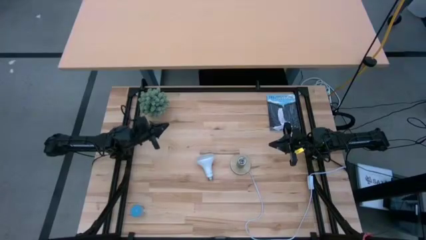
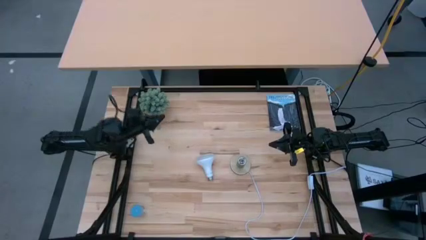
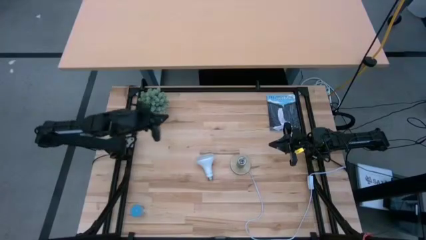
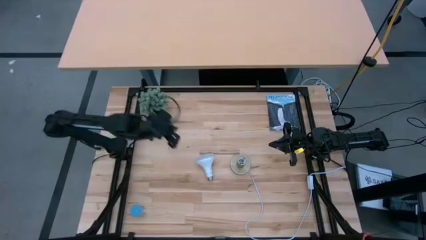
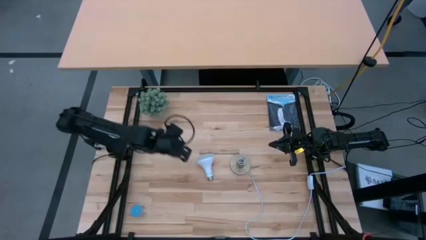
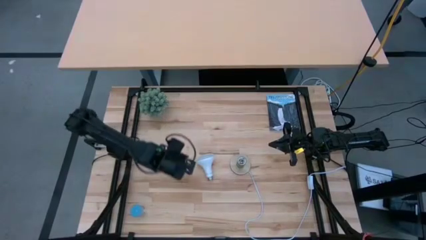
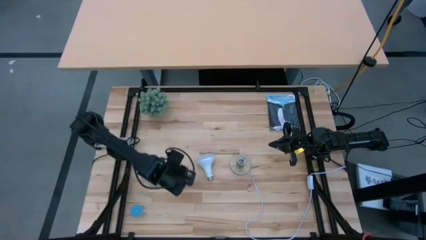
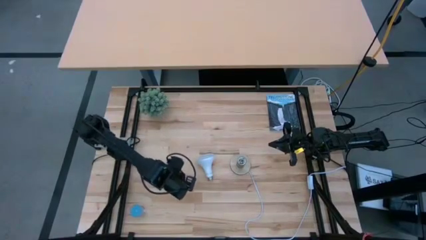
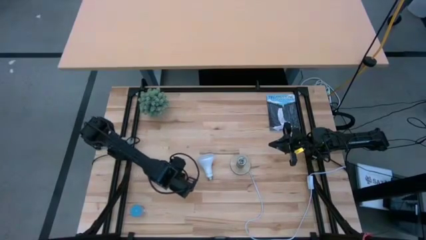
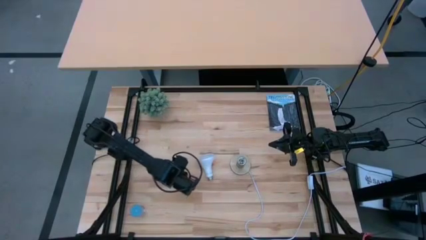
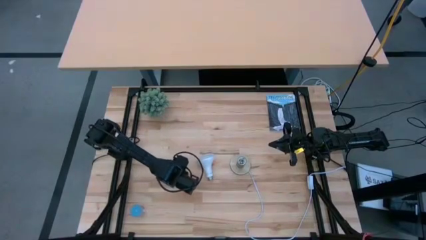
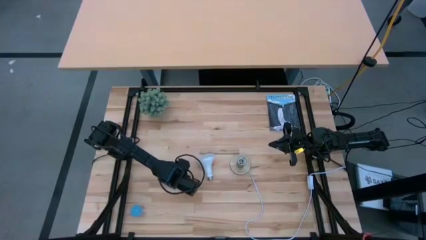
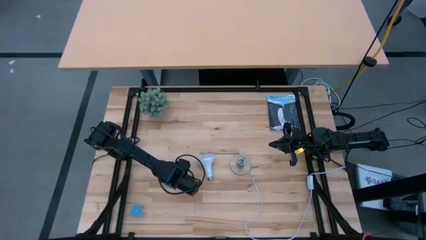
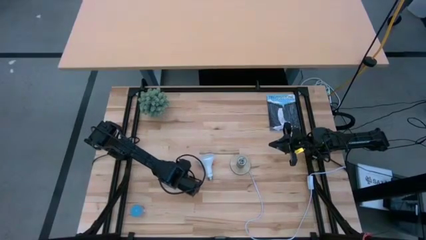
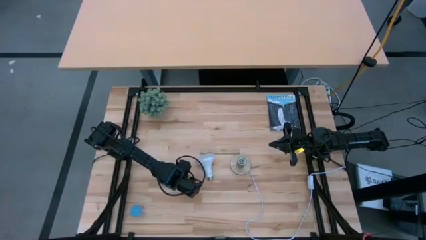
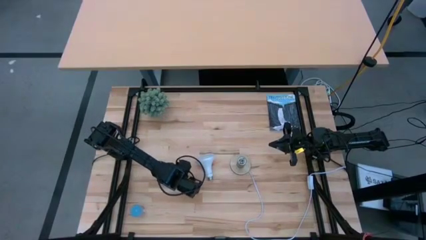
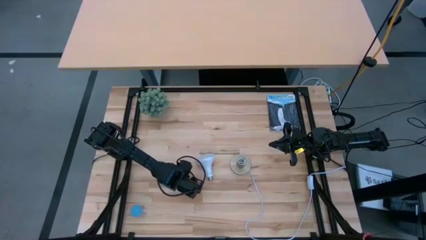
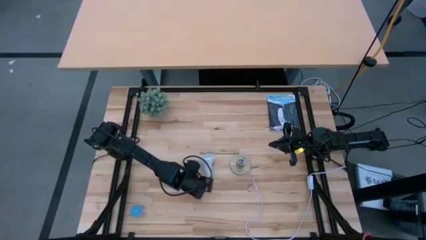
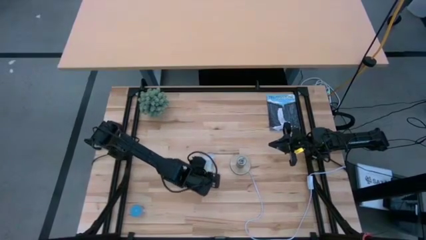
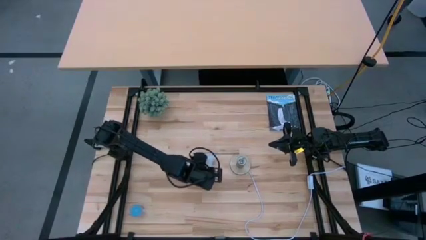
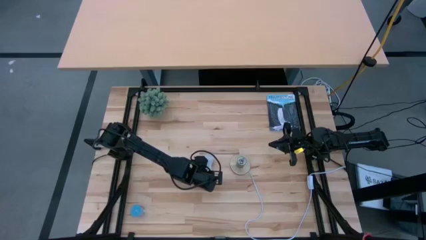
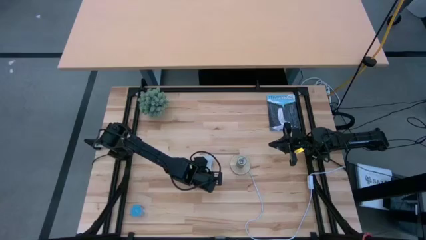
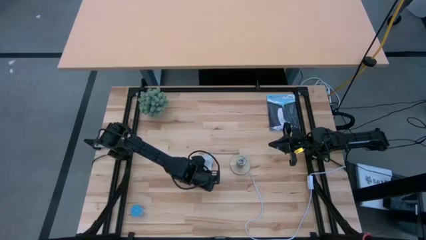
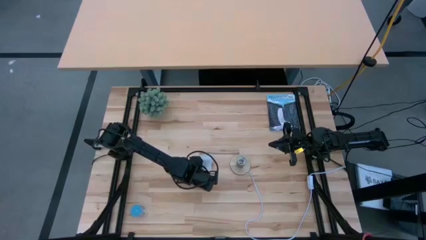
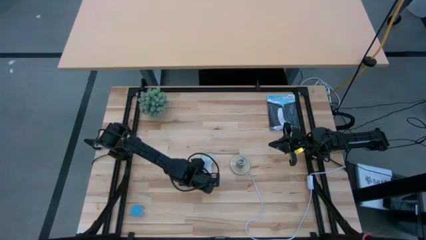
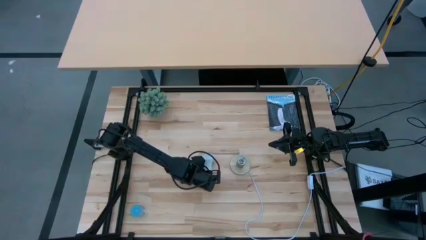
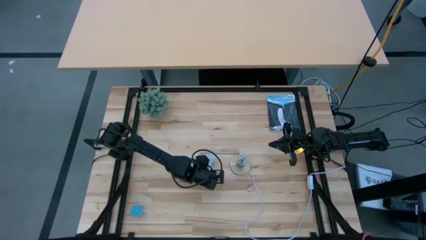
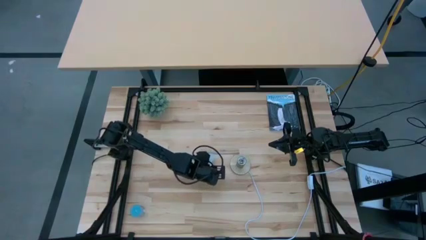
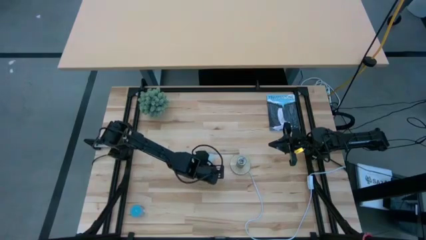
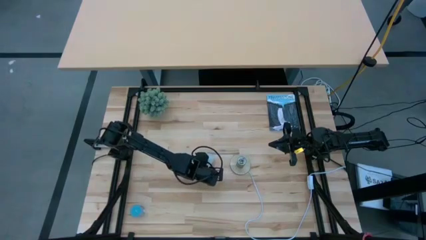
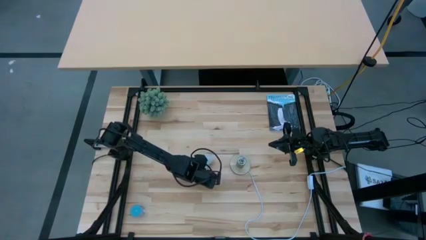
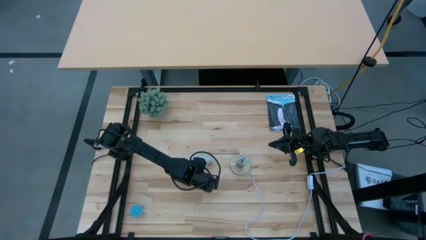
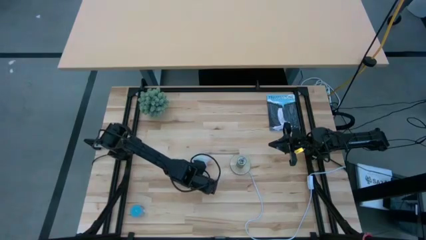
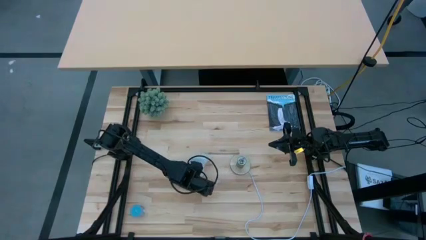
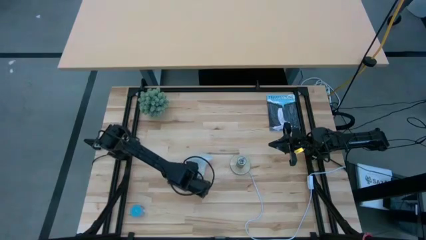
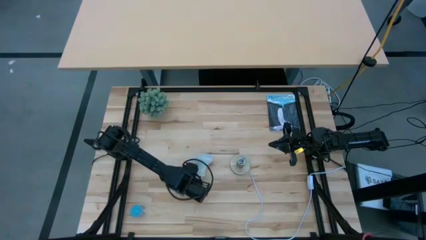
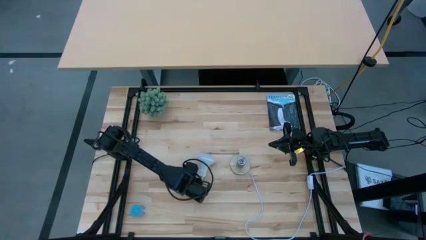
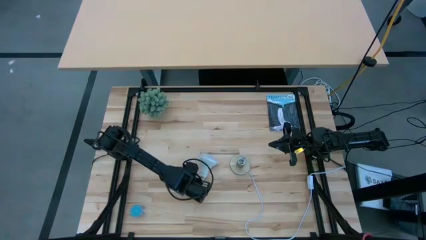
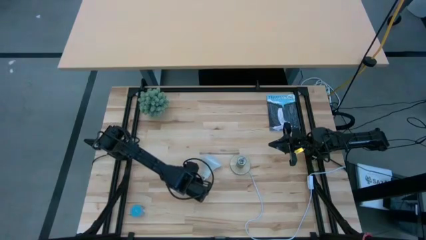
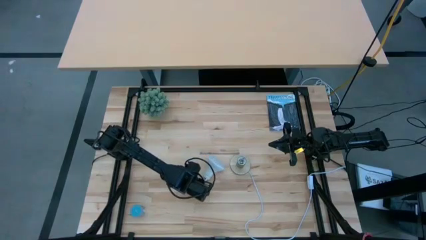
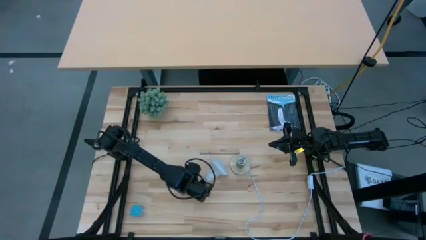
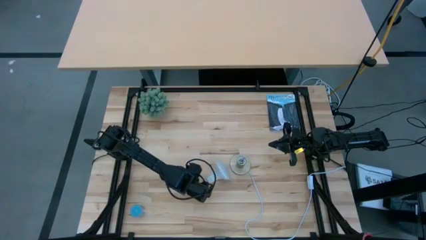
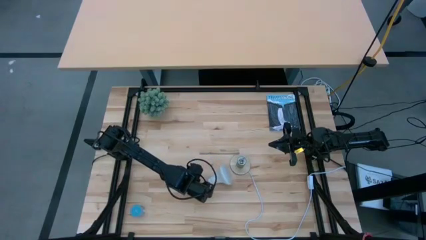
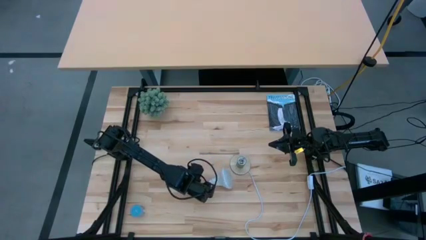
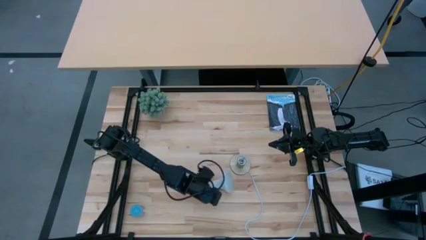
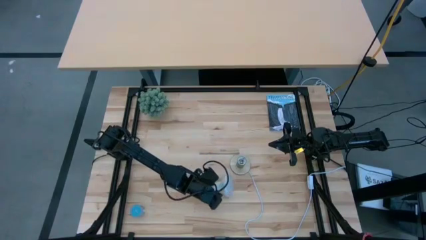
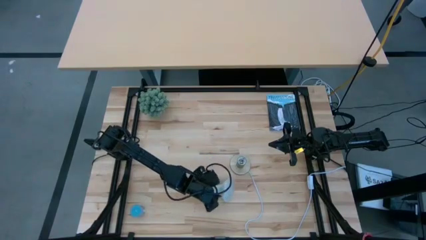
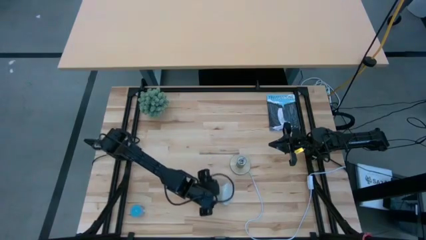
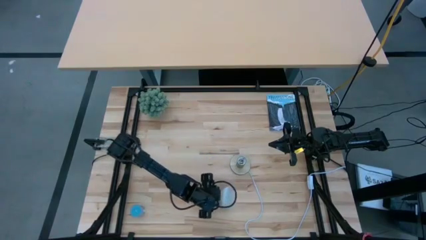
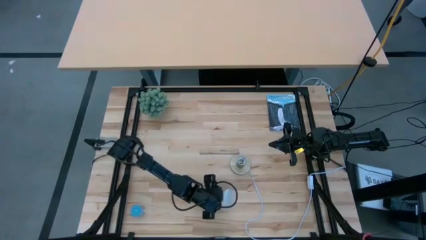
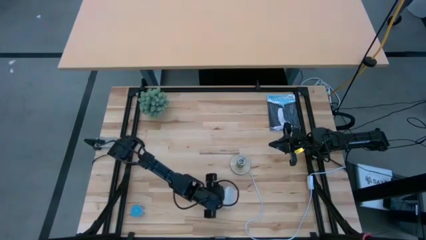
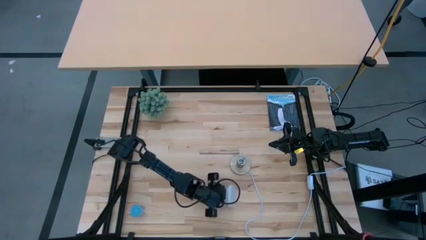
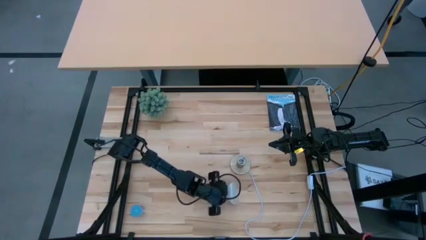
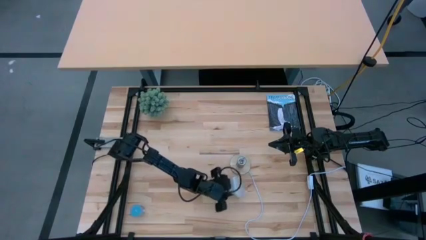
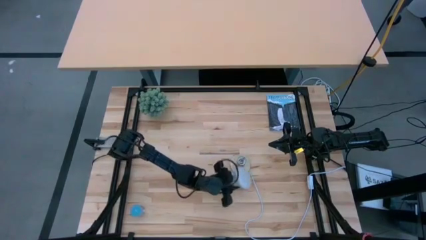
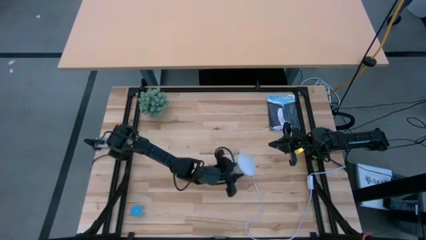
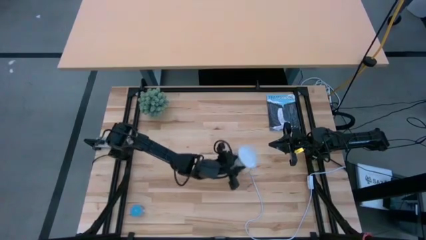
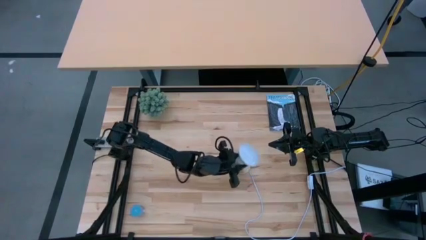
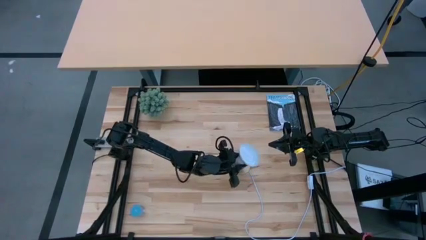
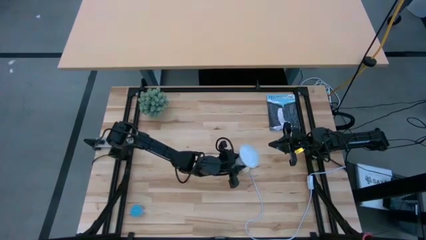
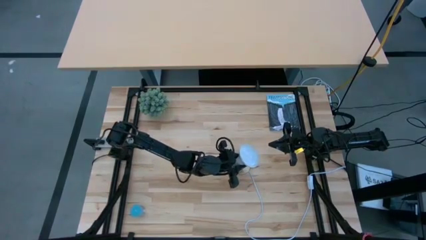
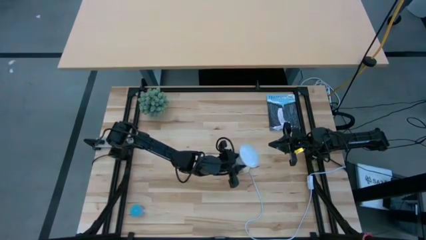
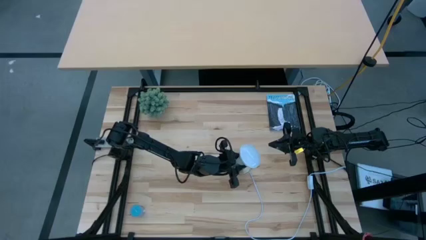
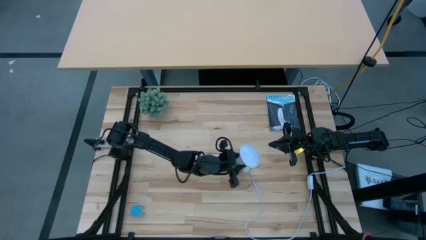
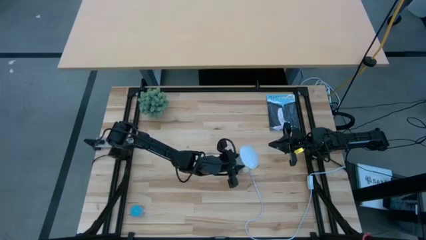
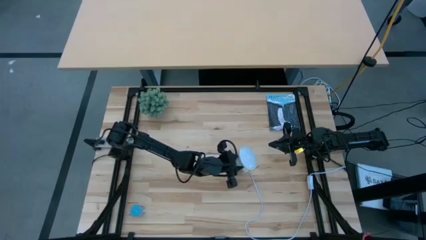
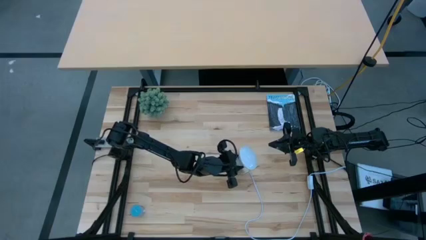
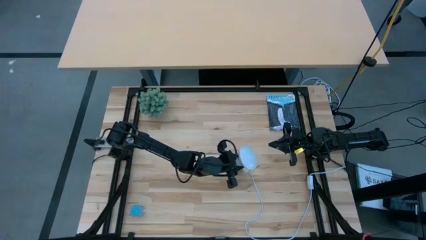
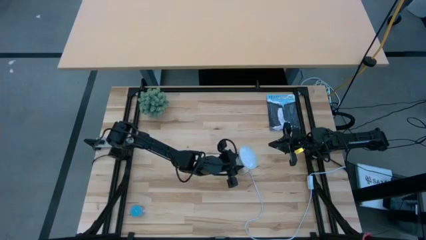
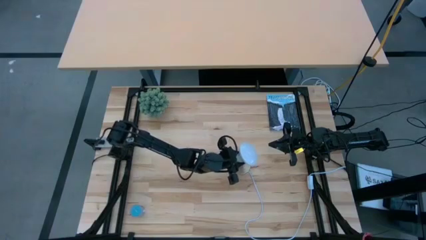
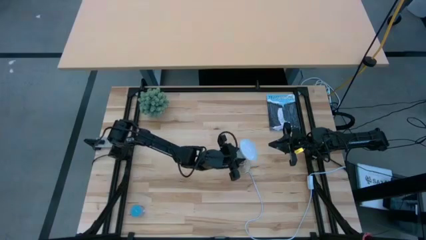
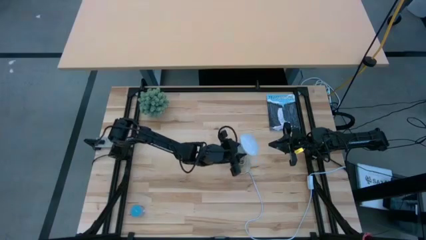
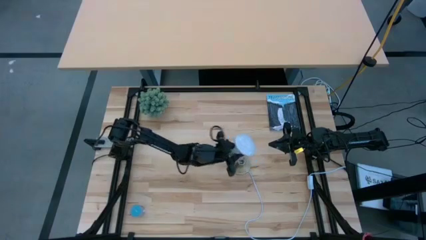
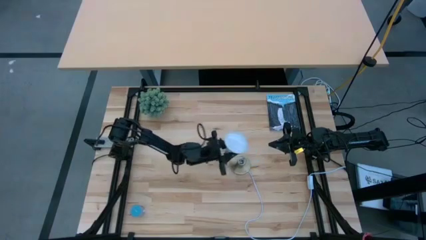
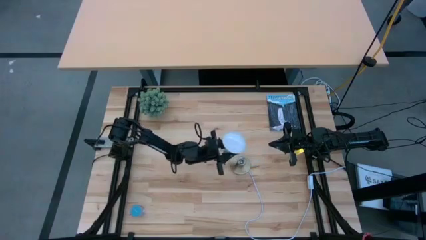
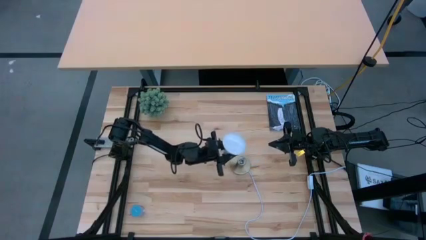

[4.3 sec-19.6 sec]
Task: Screw lightbulb
Insert the lightbulb into the lamp
